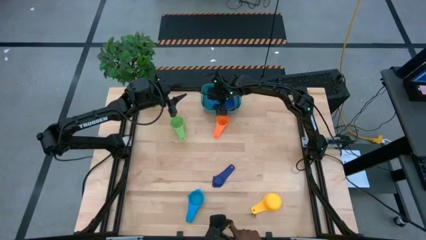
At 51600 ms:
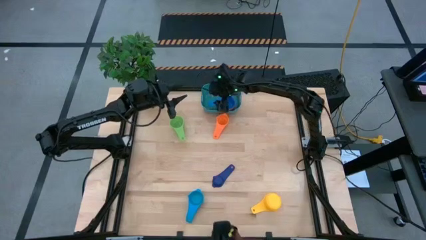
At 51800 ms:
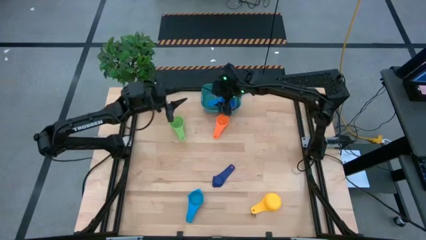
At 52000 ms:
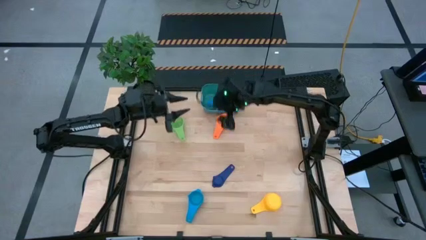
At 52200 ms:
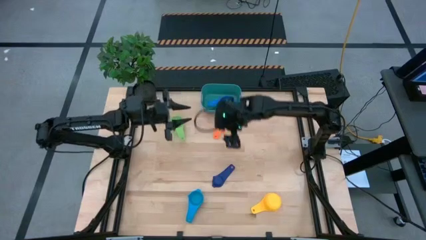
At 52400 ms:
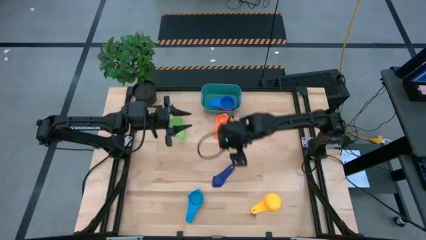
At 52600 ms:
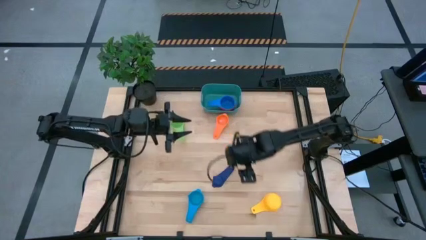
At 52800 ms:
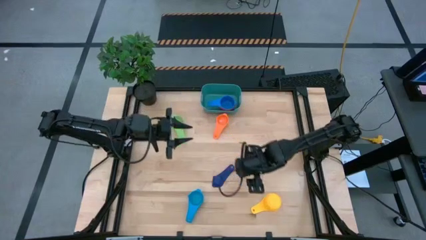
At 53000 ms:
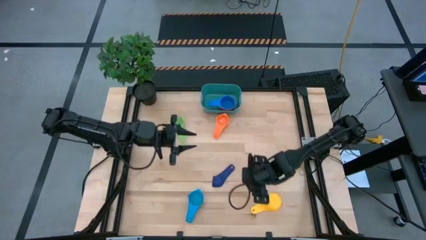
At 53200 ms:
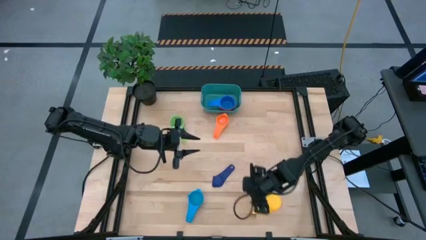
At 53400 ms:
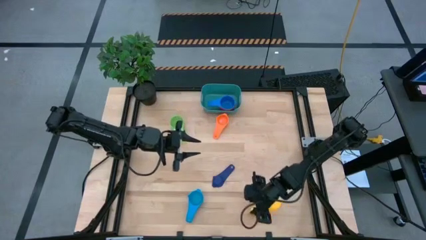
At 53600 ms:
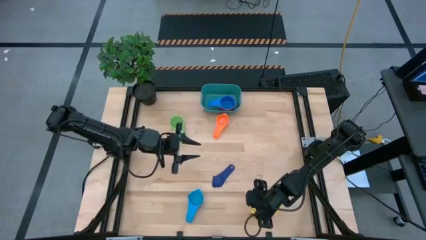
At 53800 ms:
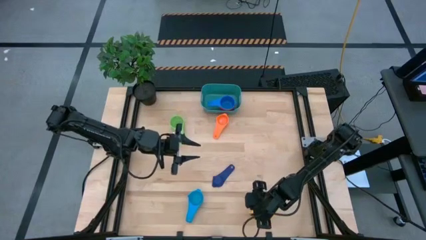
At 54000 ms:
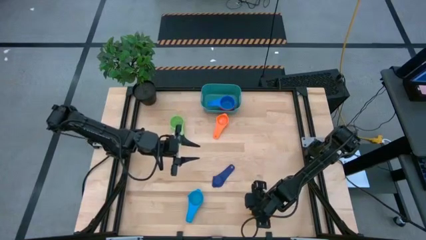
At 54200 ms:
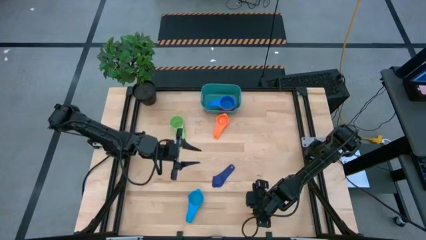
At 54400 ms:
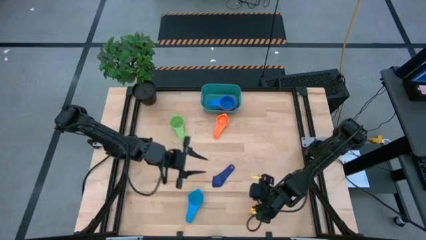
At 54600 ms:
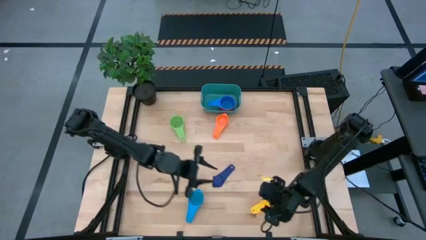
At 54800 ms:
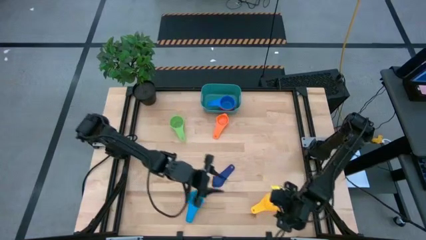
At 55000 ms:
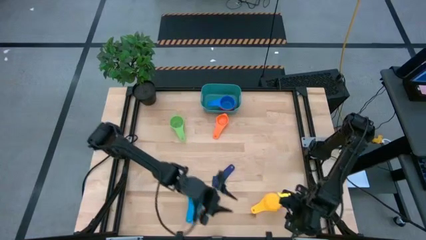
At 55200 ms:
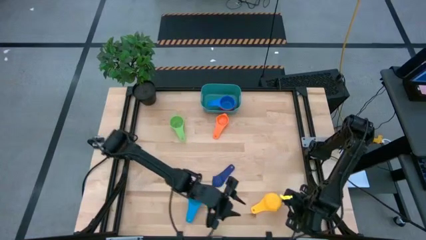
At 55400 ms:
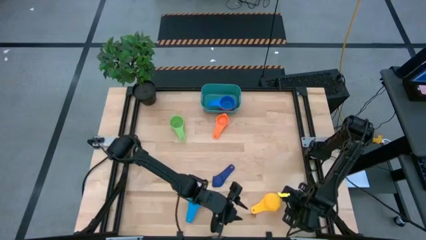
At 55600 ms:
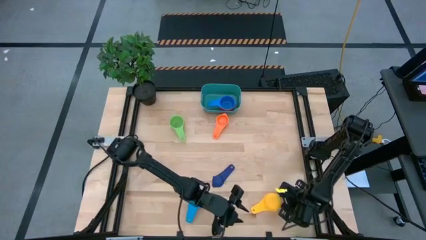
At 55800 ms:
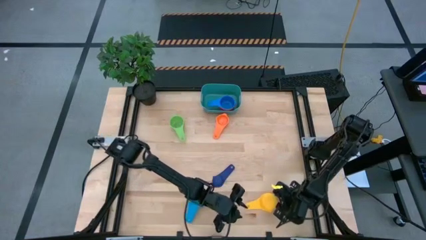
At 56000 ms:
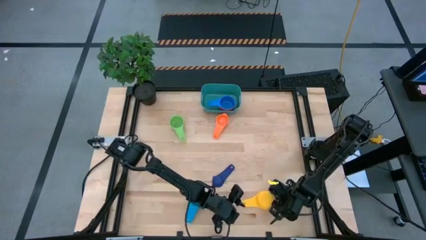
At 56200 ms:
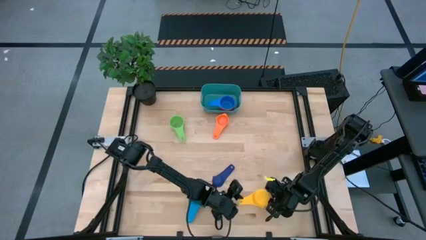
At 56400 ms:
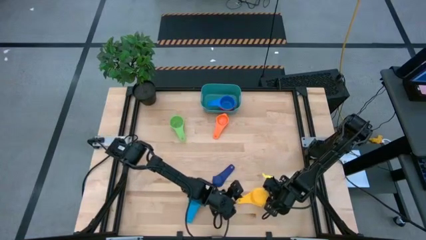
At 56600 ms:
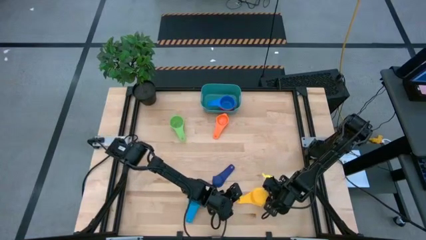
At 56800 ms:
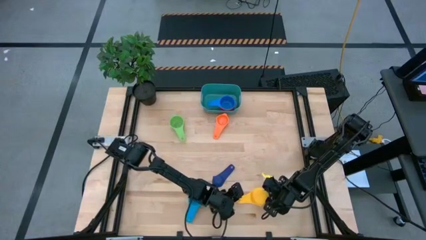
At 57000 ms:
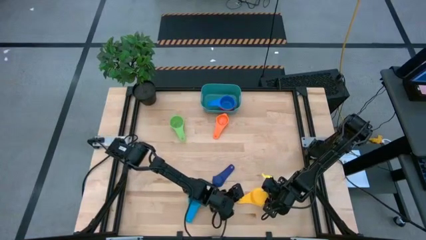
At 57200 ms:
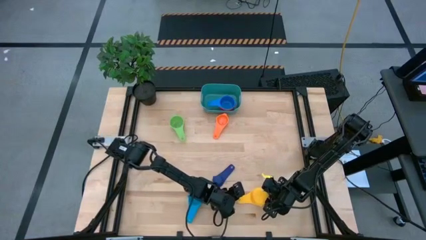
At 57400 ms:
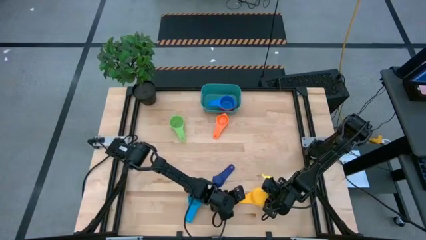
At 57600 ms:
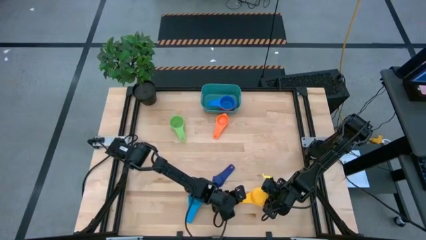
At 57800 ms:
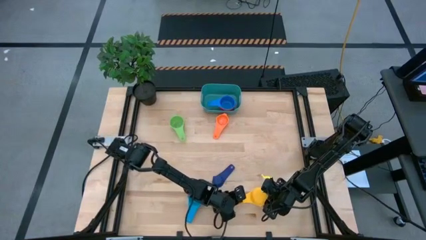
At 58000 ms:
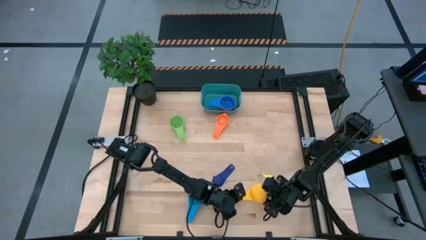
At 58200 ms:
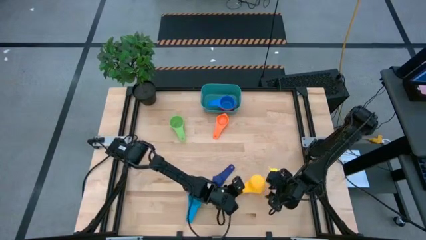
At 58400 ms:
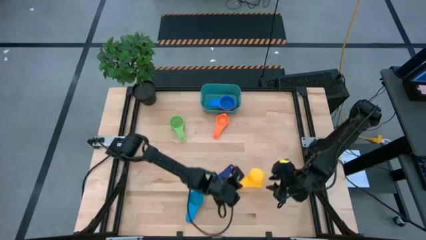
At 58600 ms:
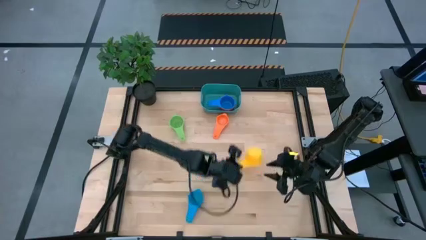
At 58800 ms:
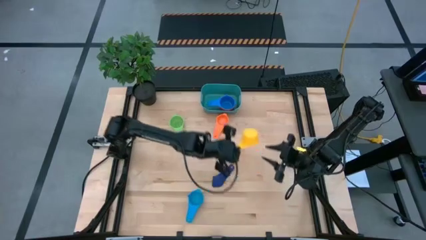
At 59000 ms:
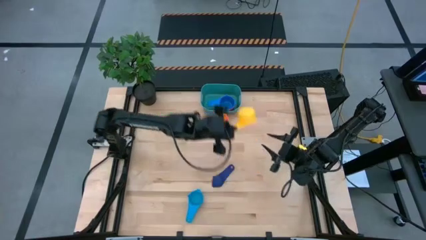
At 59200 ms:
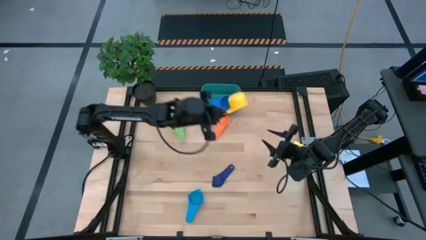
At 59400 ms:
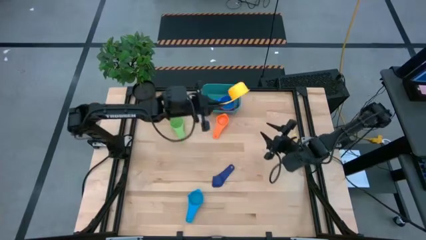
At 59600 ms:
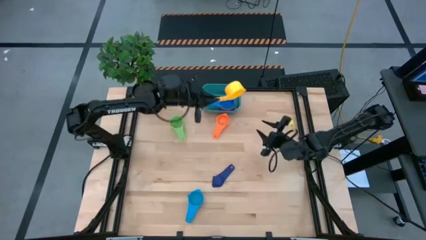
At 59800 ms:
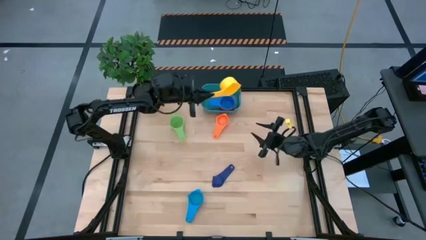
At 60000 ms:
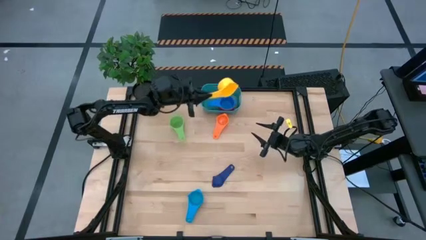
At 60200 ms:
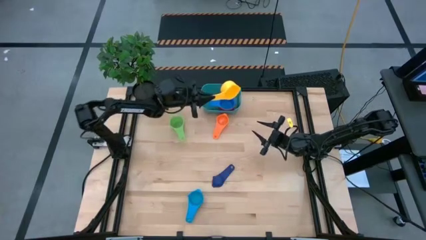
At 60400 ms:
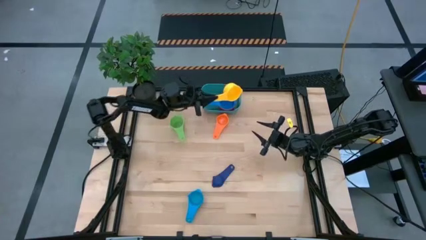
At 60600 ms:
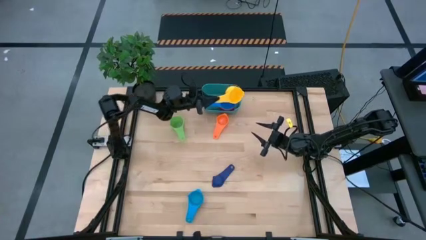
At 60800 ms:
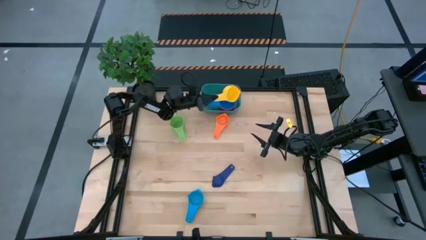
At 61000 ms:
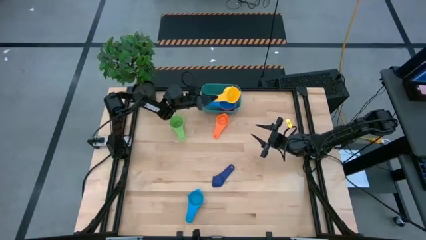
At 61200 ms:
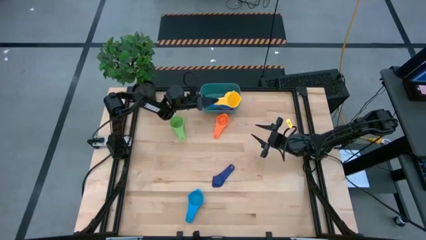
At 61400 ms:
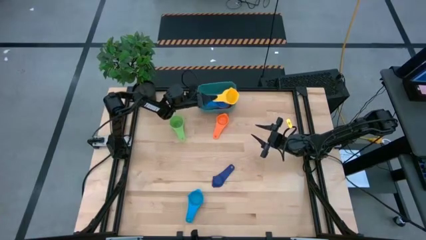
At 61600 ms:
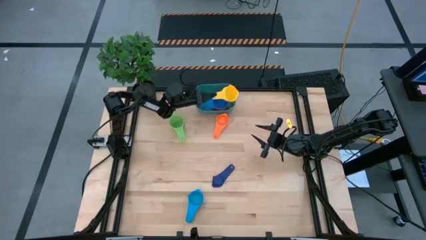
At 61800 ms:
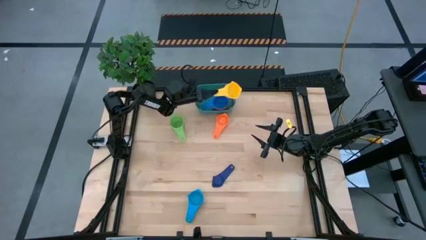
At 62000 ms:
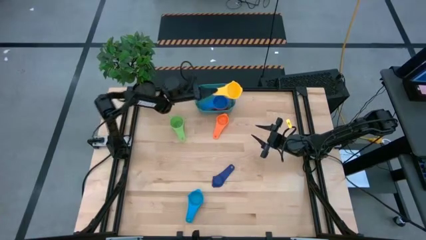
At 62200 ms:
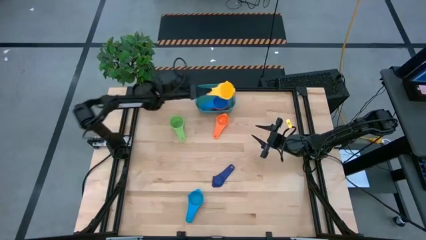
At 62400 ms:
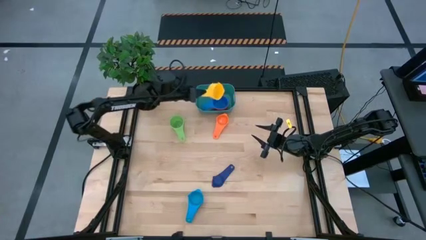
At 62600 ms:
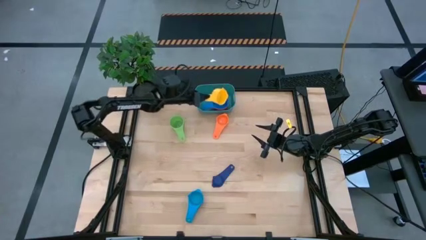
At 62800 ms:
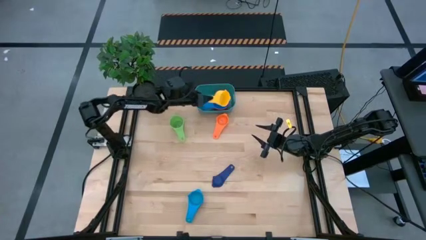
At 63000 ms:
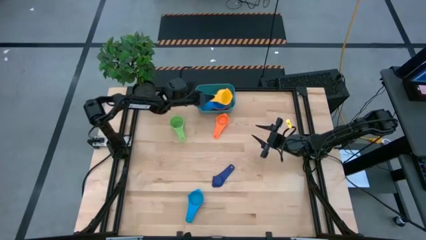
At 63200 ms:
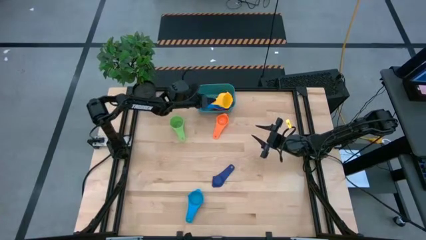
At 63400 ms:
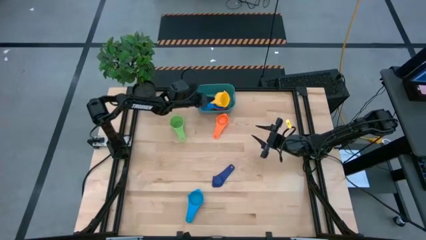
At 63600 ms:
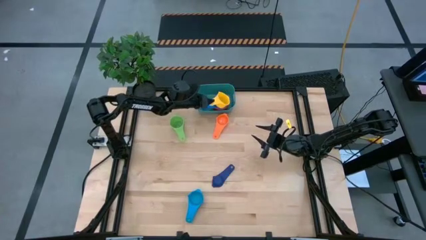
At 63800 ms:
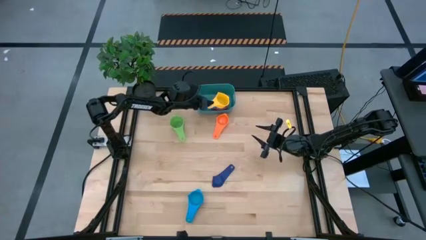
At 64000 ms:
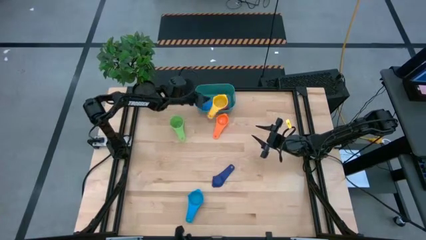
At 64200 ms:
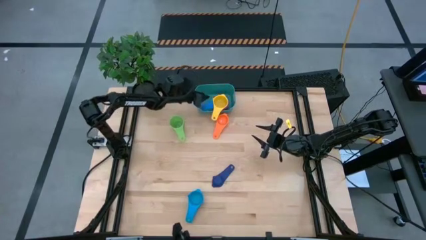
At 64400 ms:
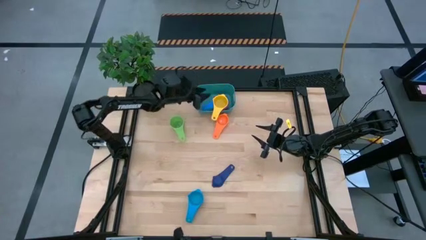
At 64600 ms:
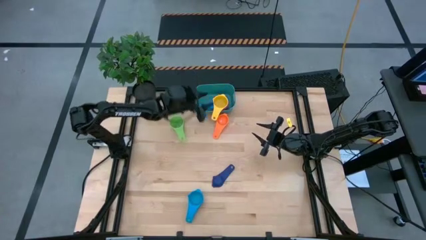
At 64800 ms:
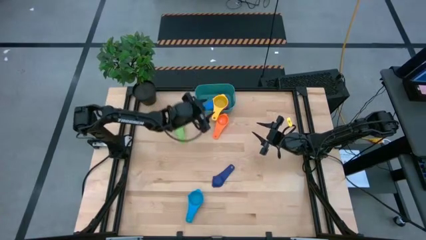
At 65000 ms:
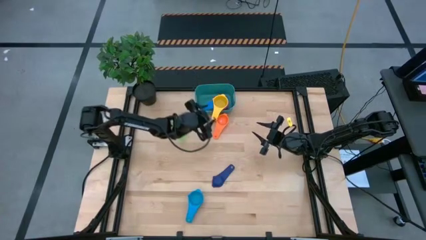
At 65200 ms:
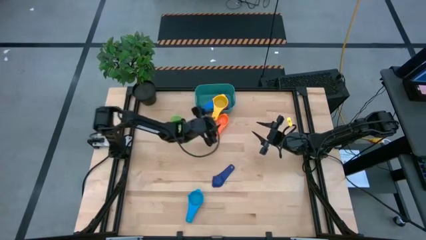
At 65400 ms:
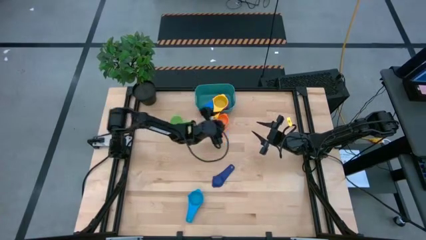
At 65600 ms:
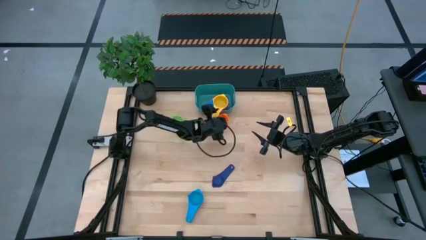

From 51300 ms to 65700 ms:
Task: Nest measuring cups in basket
Stack the yellow measuring cup on top of the blue measuring cup in the blue bin
